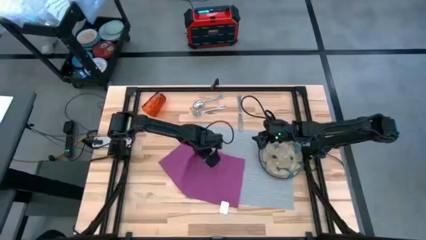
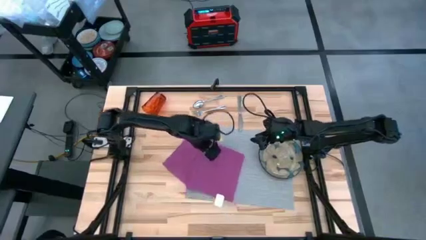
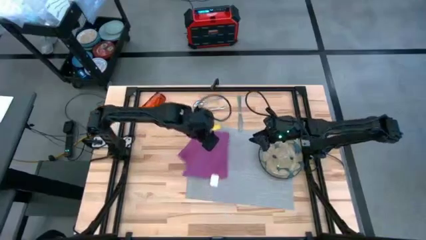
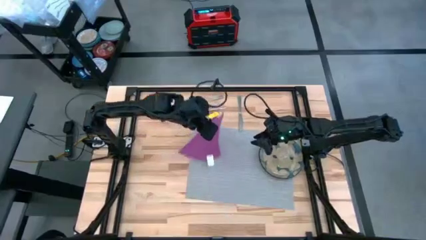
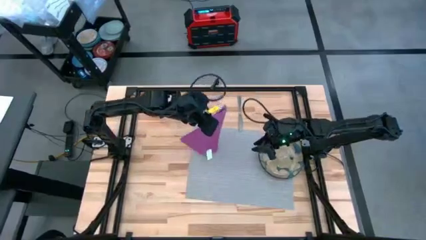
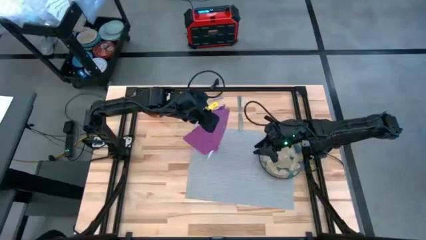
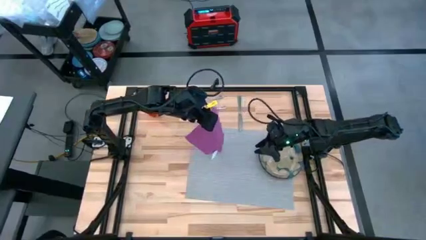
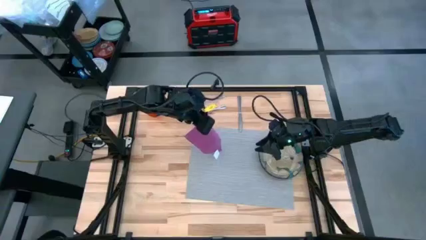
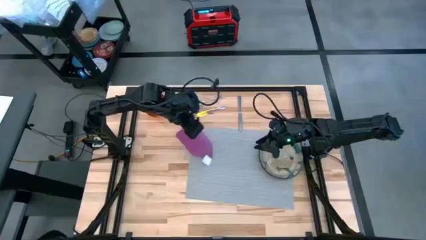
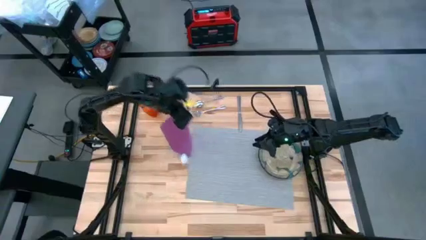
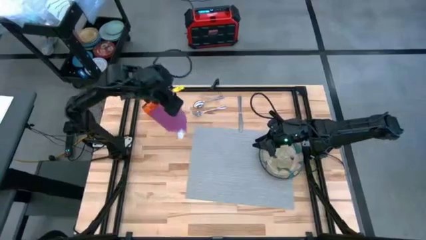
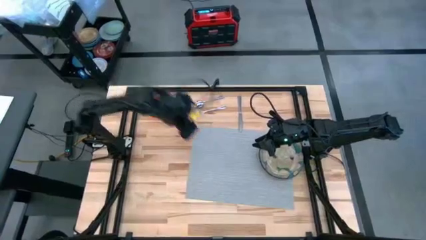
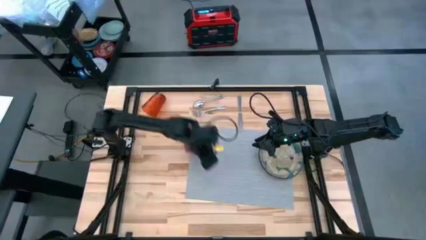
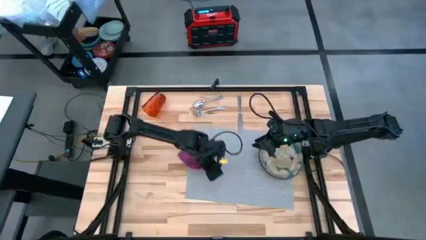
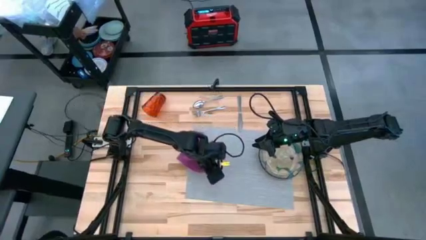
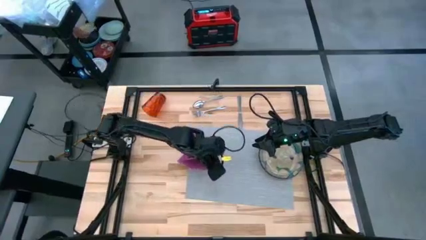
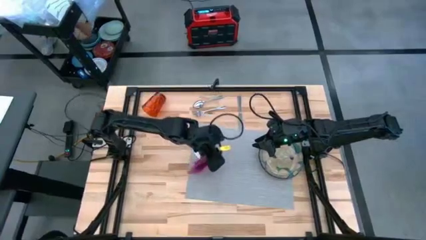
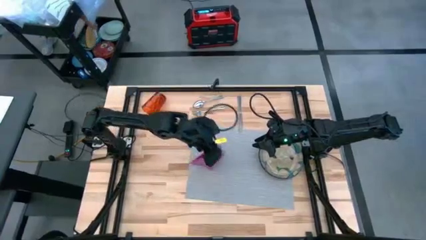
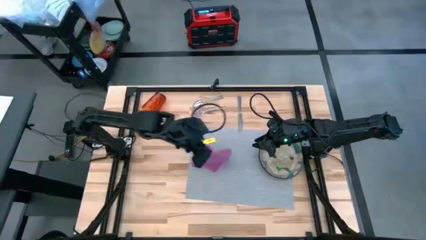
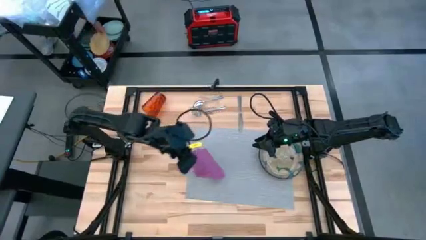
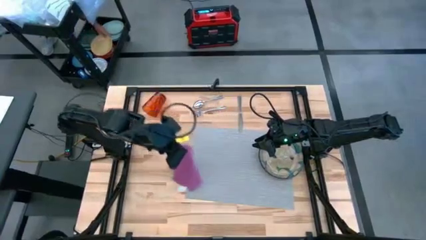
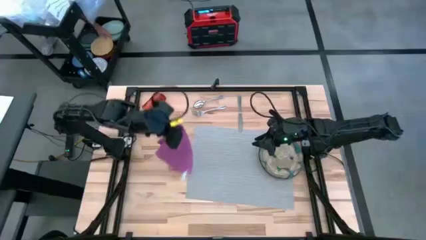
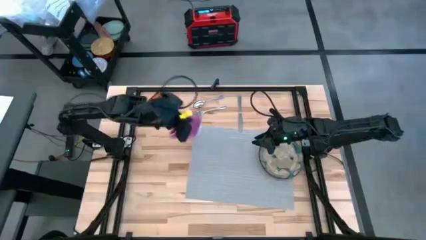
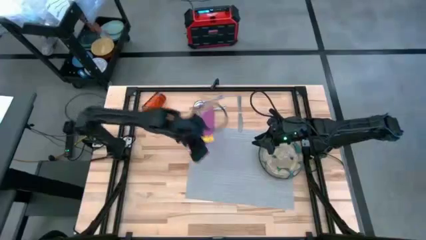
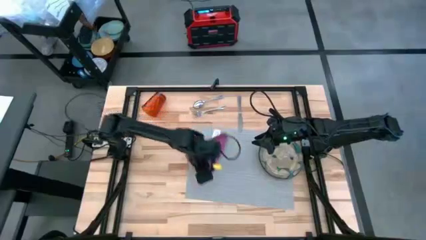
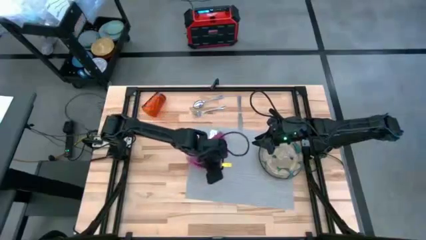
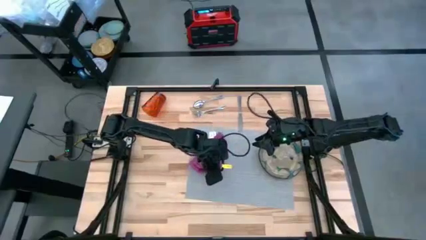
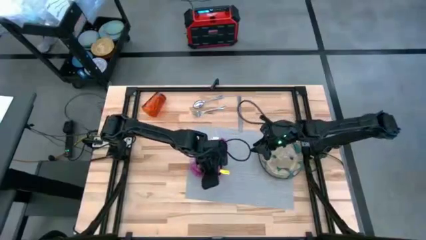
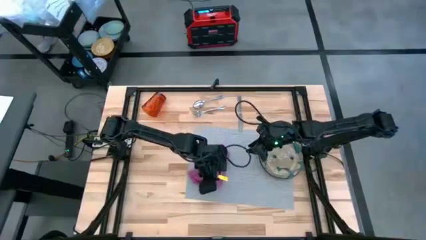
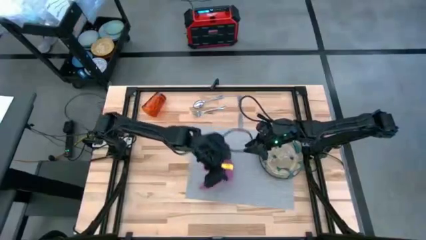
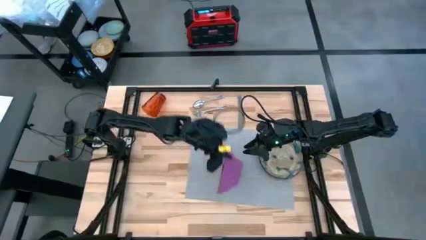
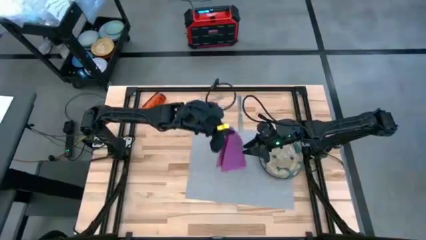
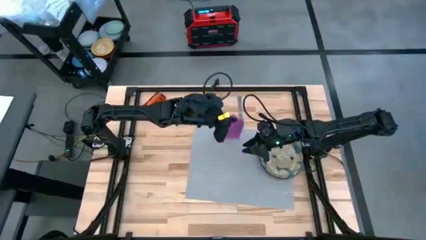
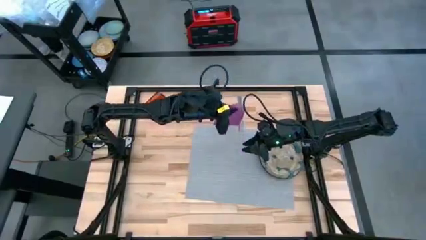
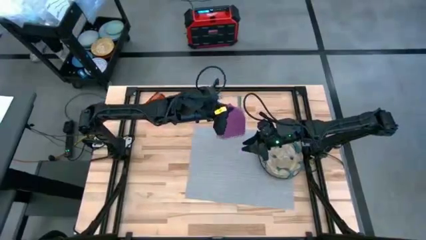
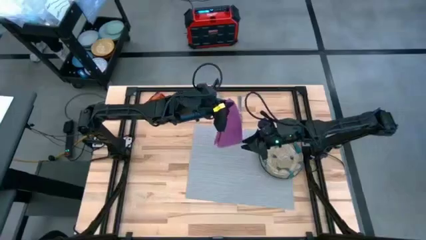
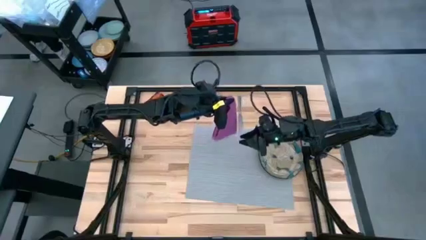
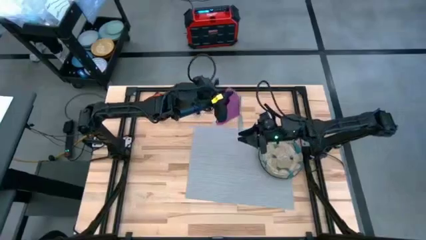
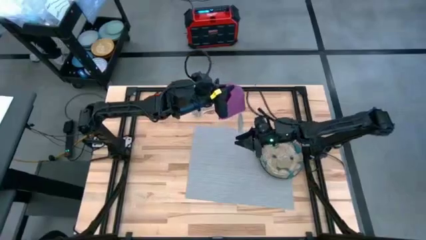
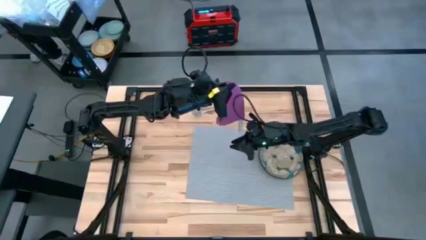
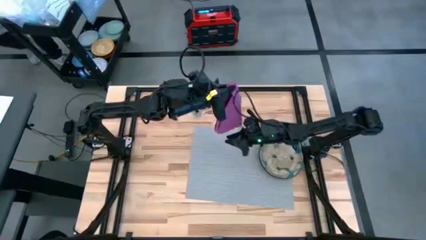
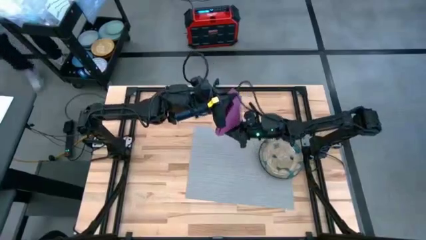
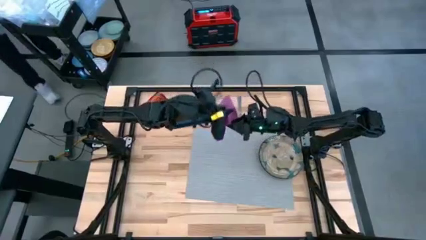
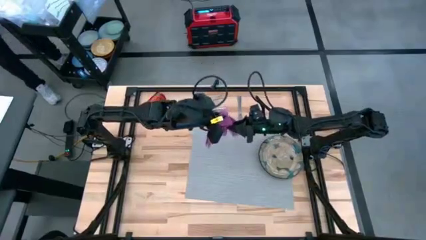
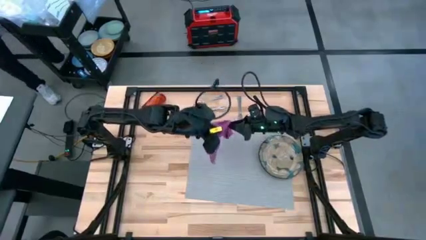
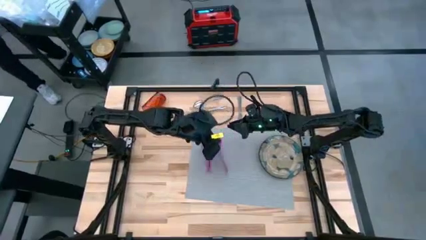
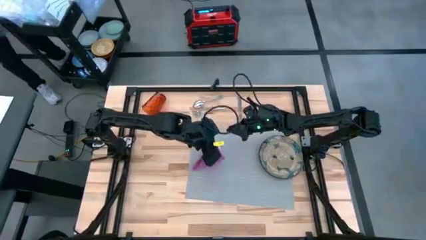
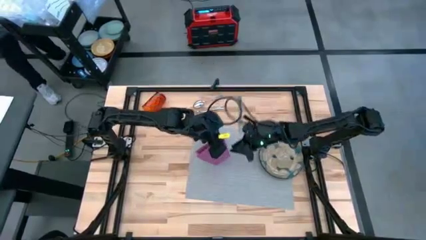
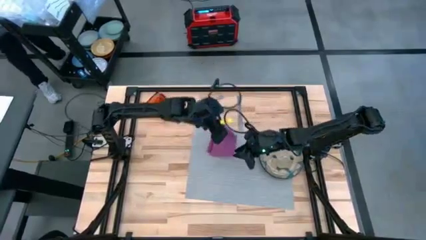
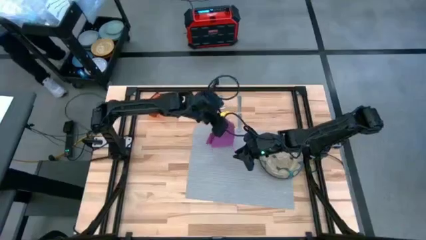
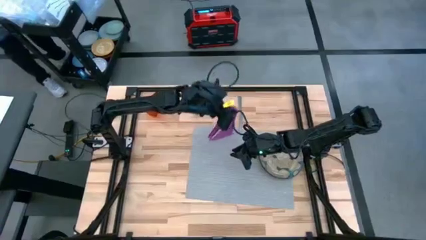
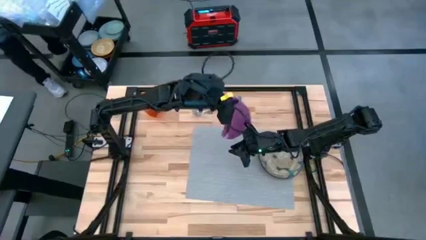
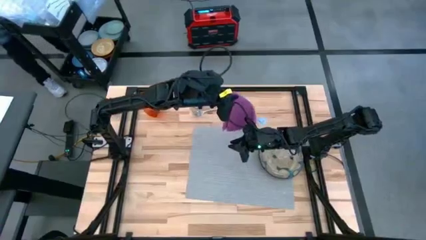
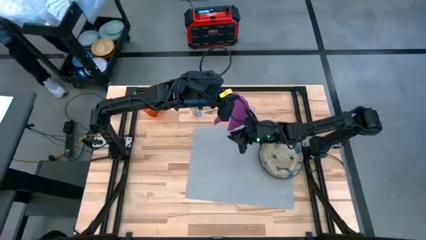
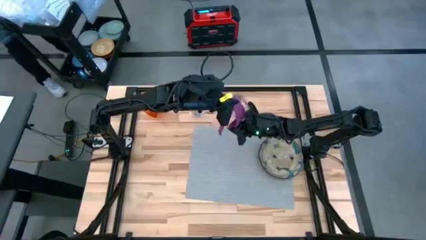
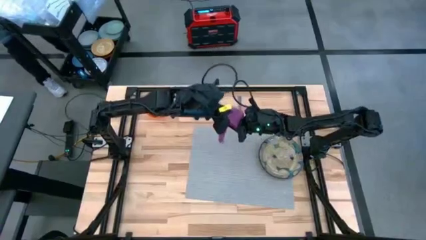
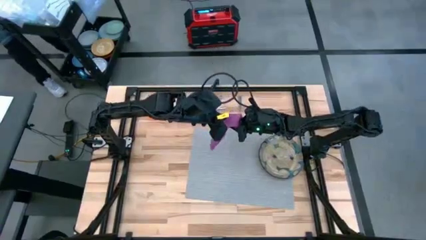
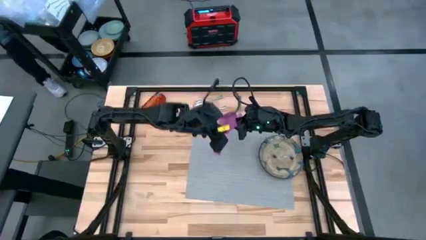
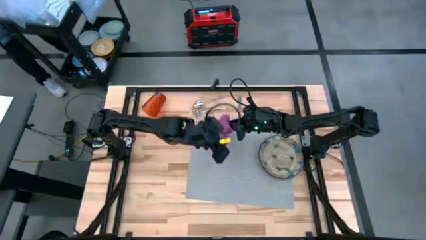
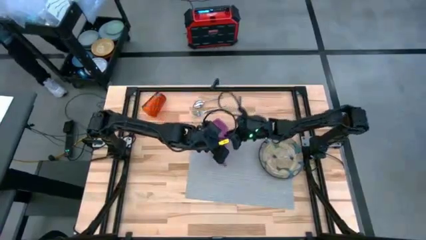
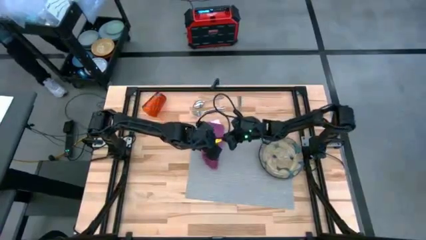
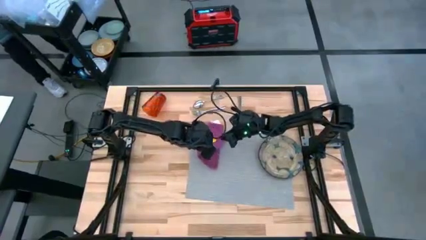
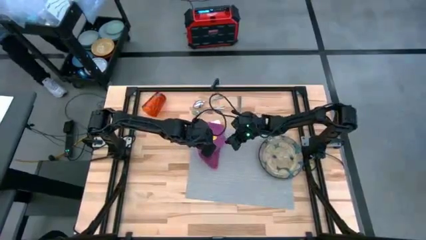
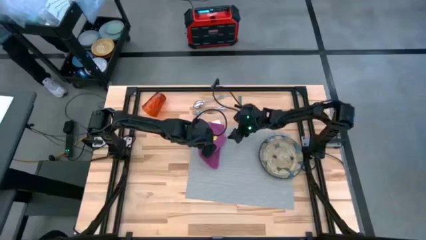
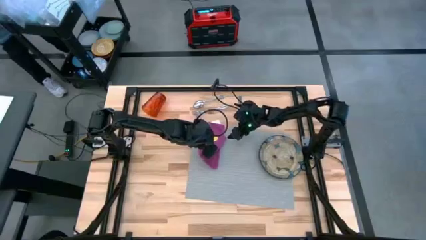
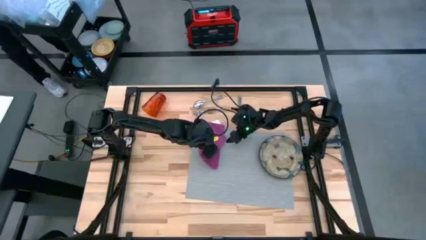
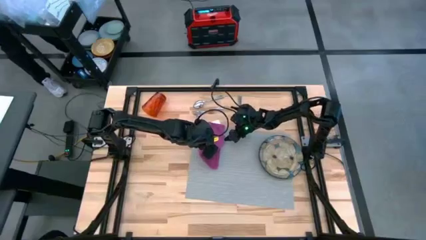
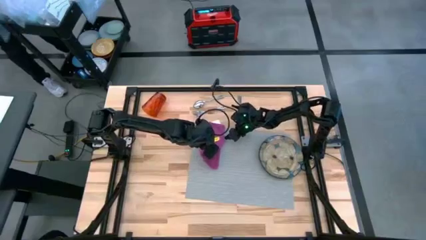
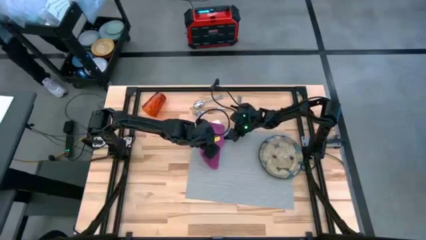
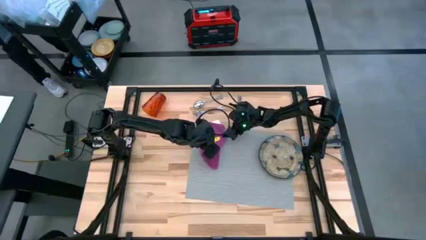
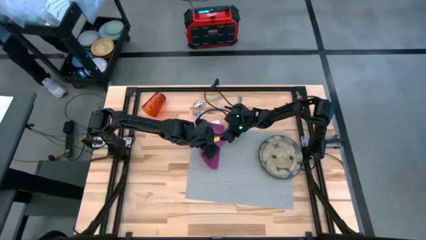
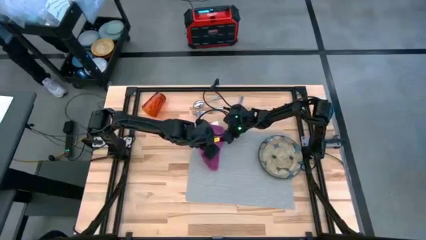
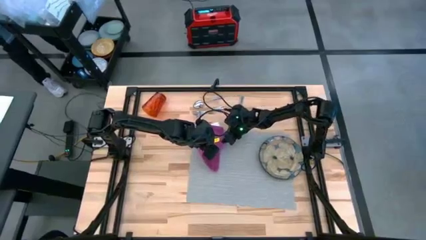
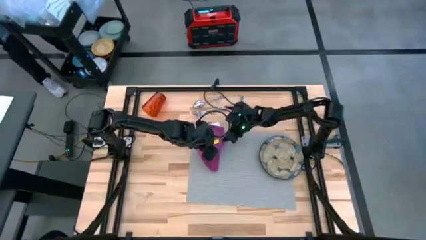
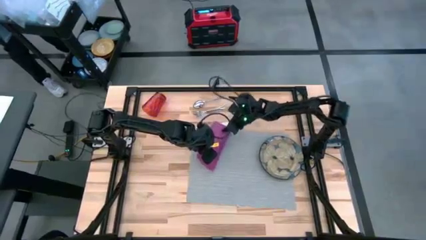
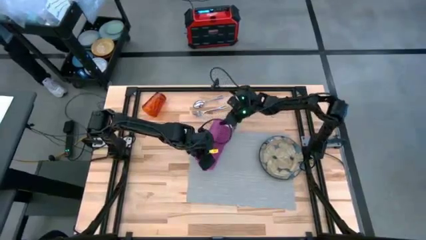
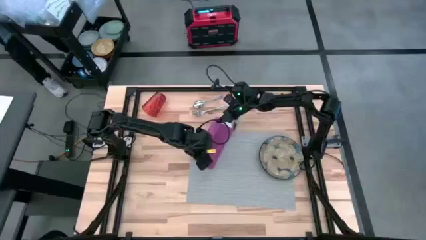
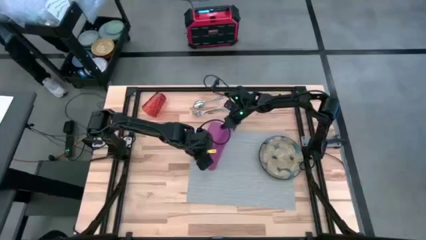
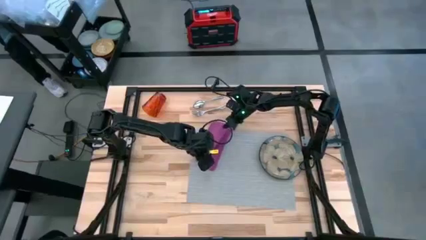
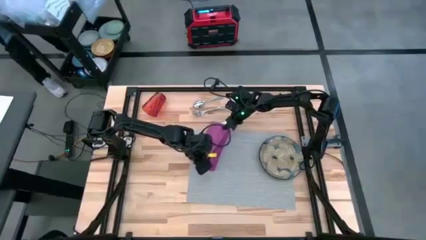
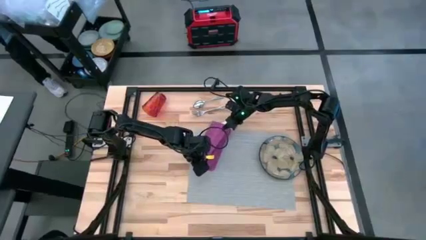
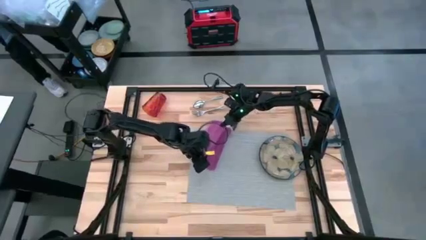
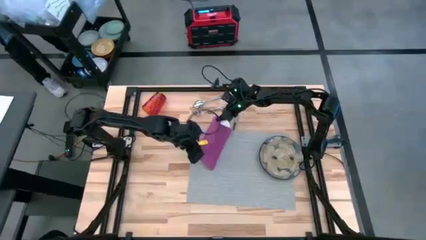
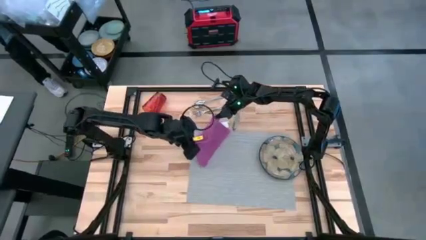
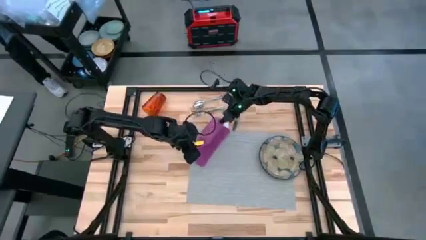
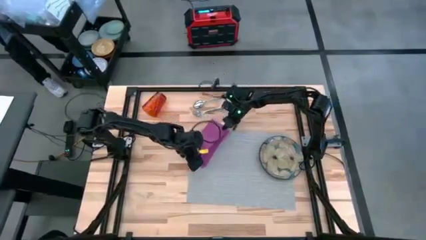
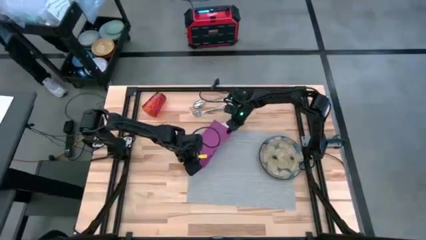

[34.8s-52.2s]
Task: Set table place
Fold the violet table napkin
